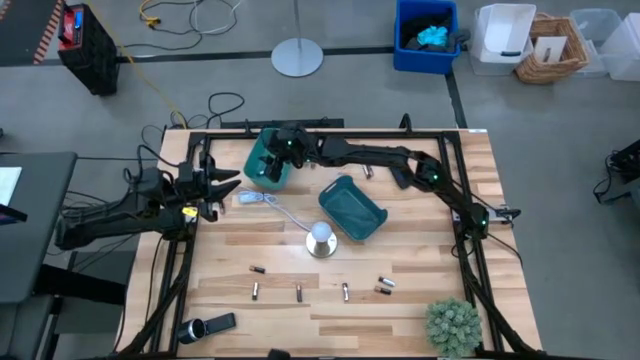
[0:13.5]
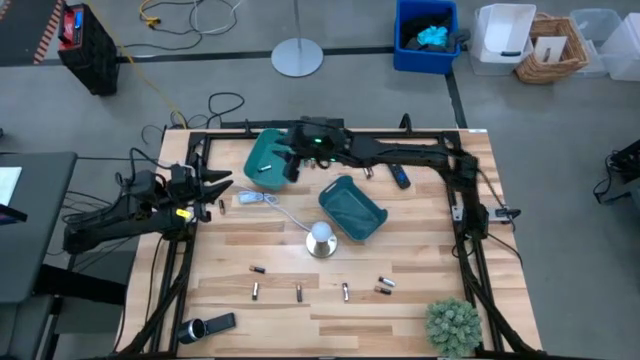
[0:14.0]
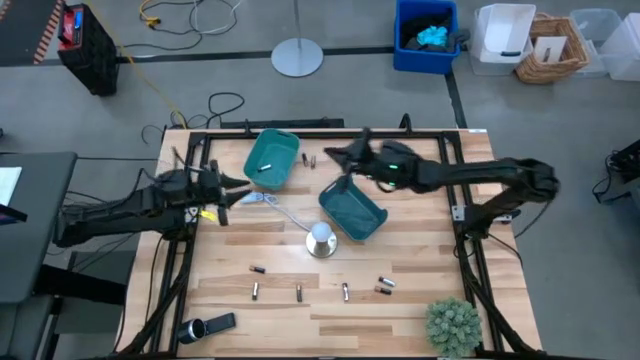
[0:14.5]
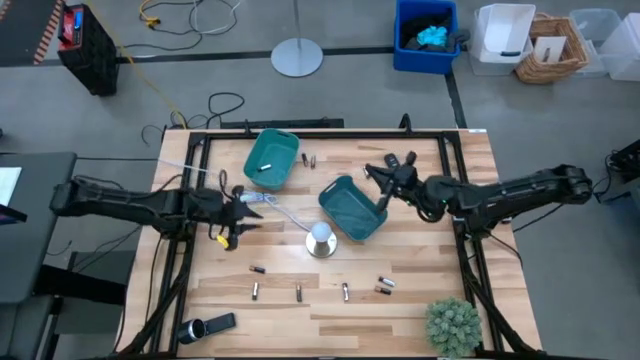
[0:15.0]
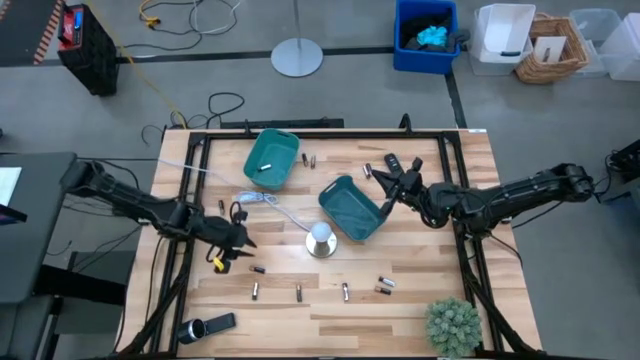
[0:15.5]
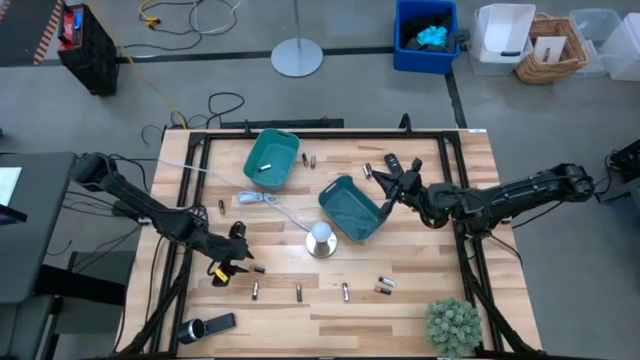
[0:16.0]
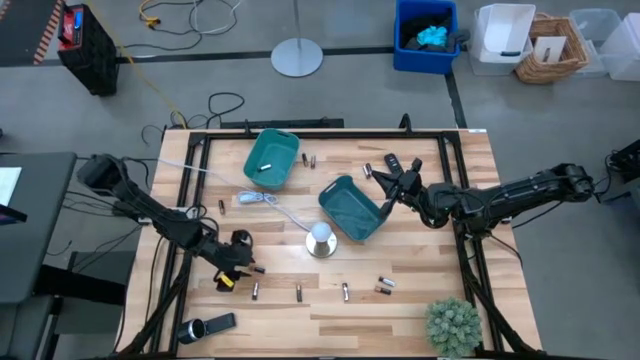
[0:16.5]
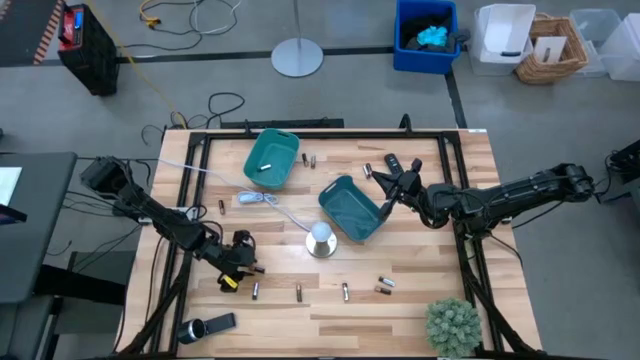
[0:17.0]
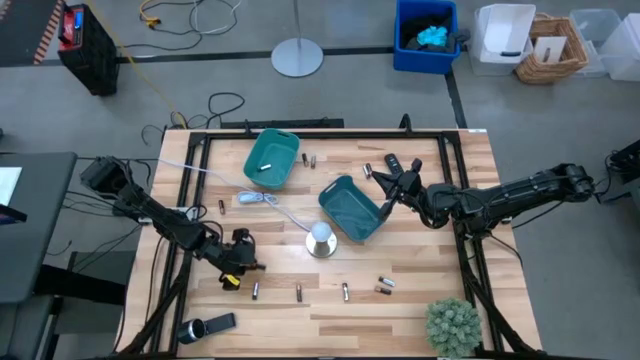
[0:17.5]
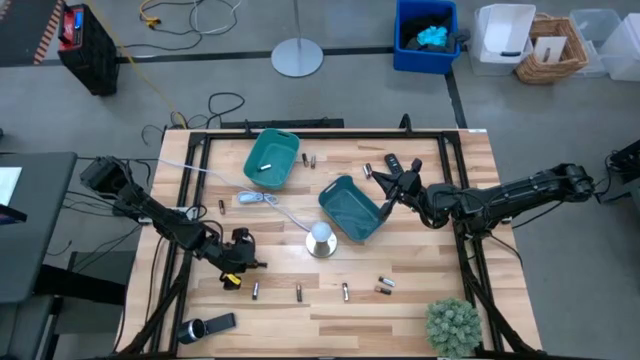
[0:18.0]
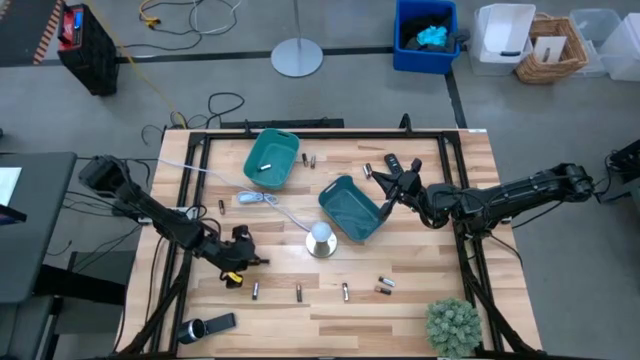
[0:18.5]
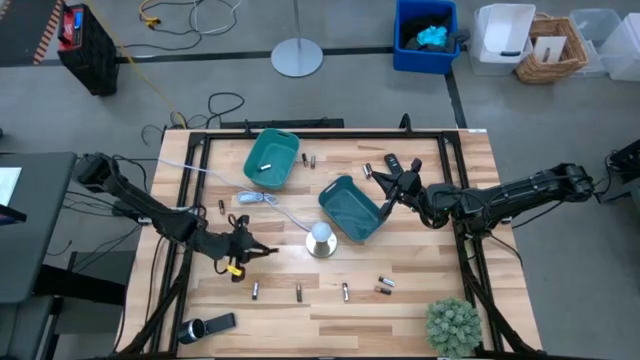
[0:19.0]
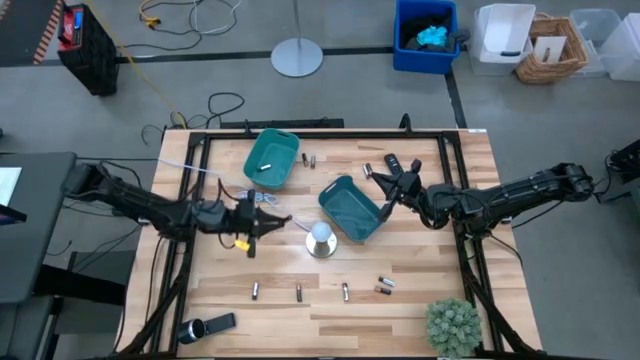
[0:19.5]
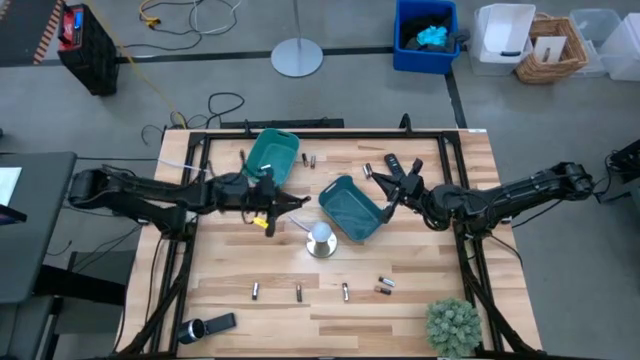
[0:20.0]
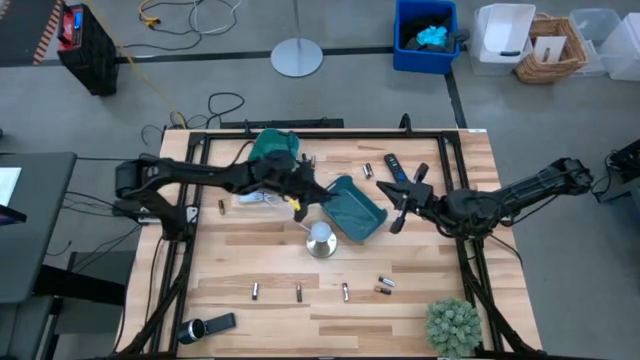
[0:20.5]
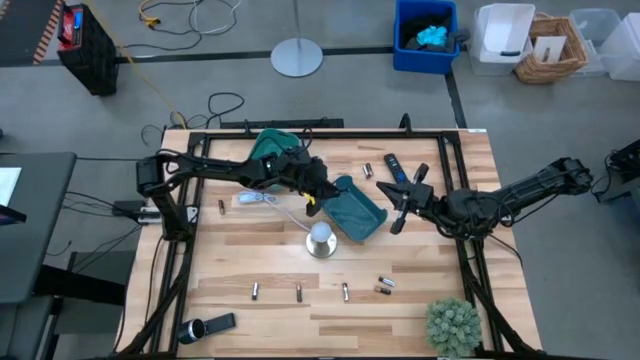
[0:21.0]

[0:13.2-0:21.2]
Task: Sort batteries
Put the black battery into the blue bin

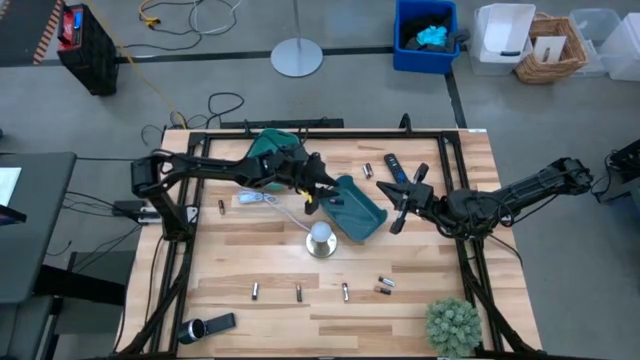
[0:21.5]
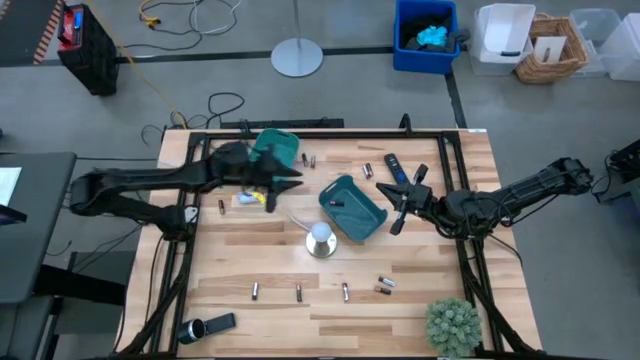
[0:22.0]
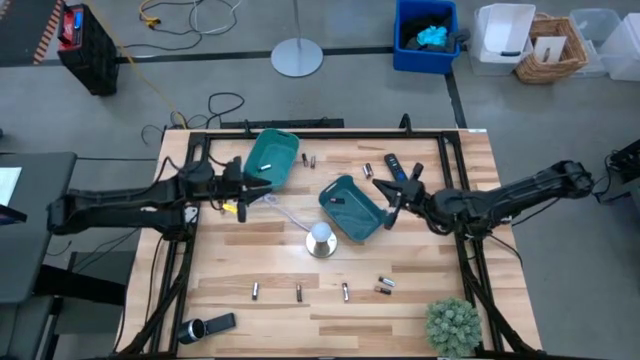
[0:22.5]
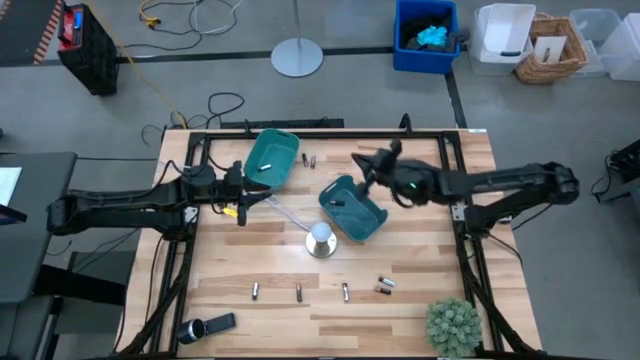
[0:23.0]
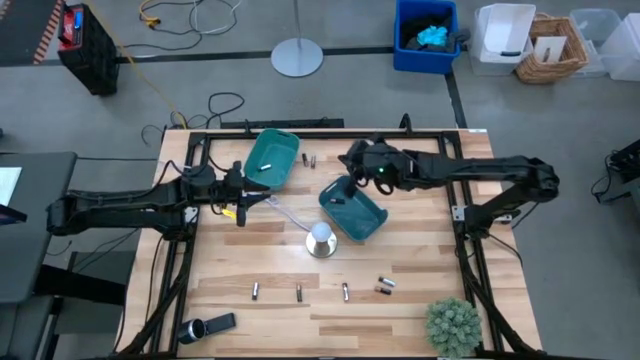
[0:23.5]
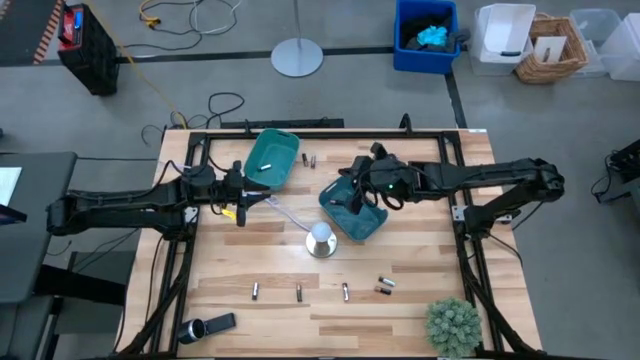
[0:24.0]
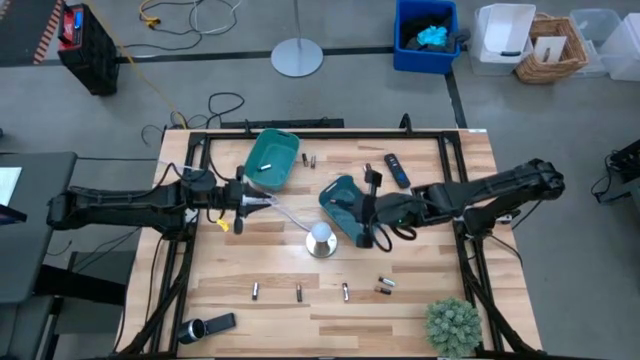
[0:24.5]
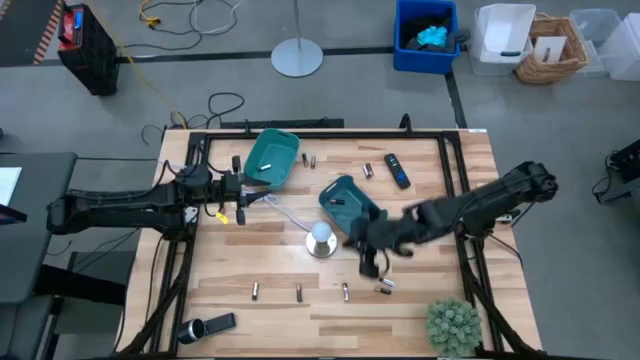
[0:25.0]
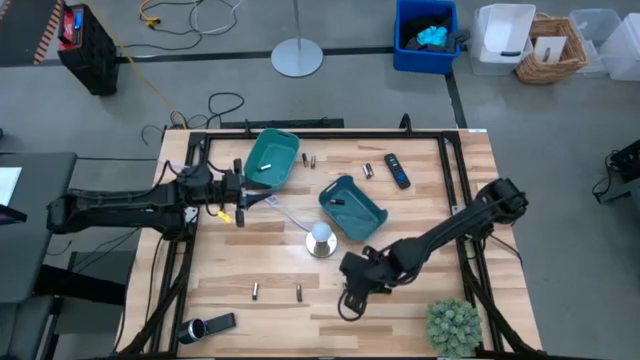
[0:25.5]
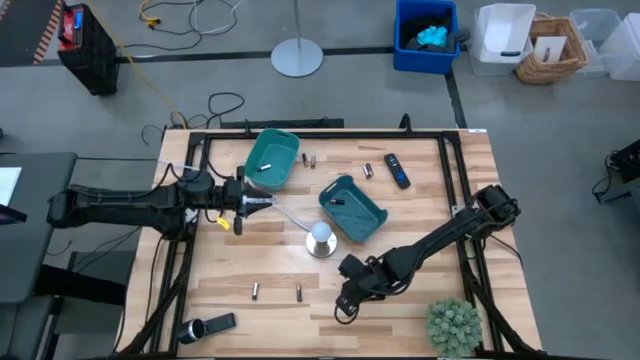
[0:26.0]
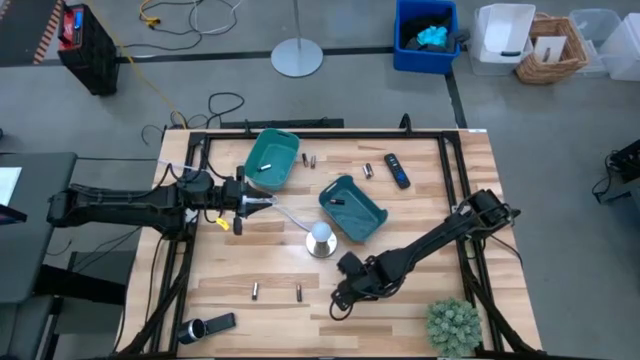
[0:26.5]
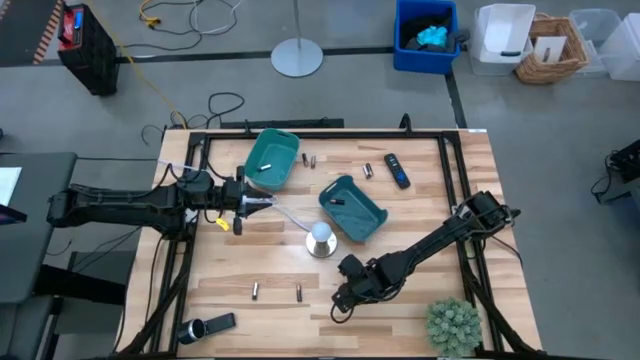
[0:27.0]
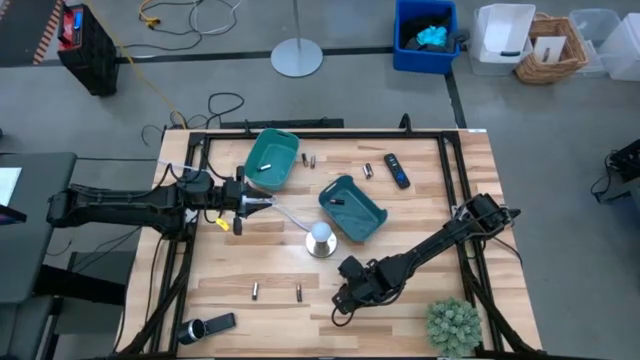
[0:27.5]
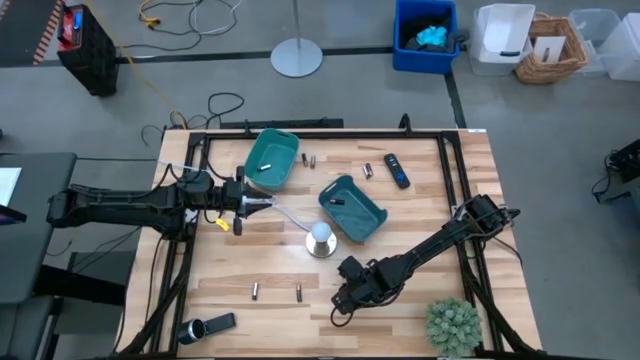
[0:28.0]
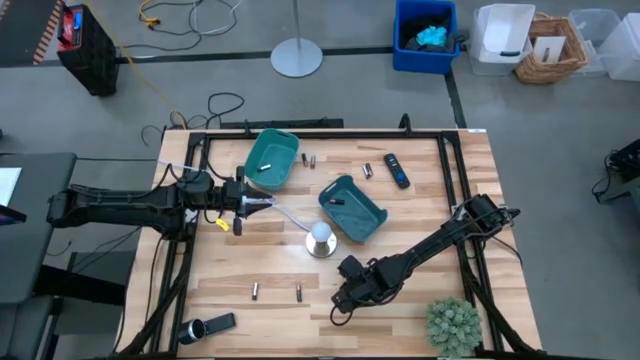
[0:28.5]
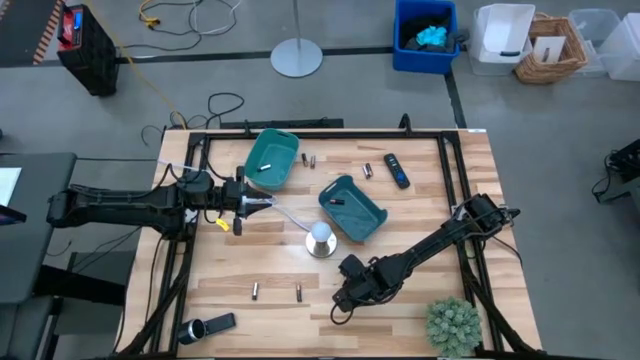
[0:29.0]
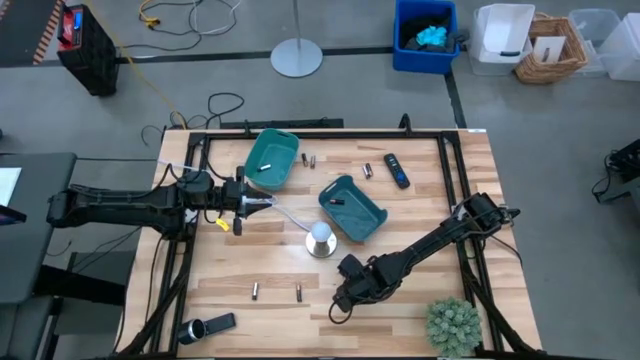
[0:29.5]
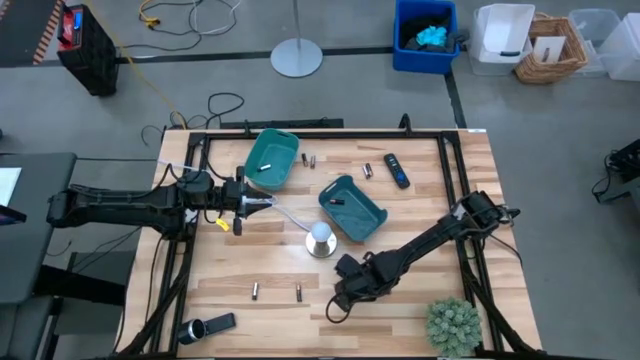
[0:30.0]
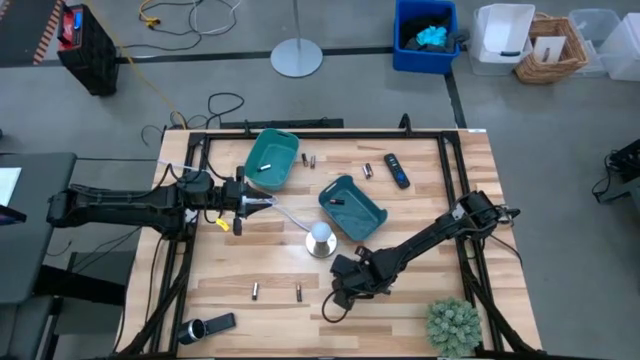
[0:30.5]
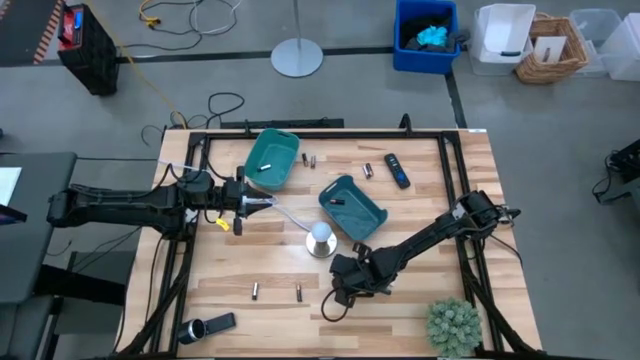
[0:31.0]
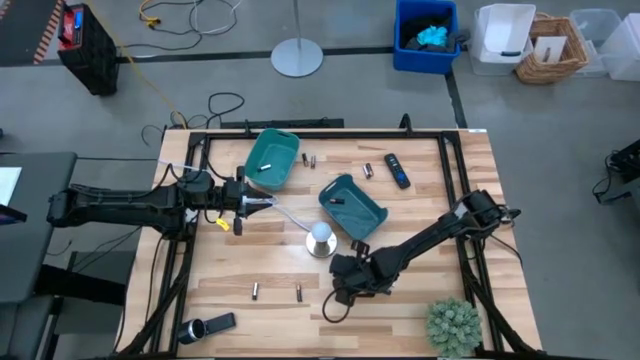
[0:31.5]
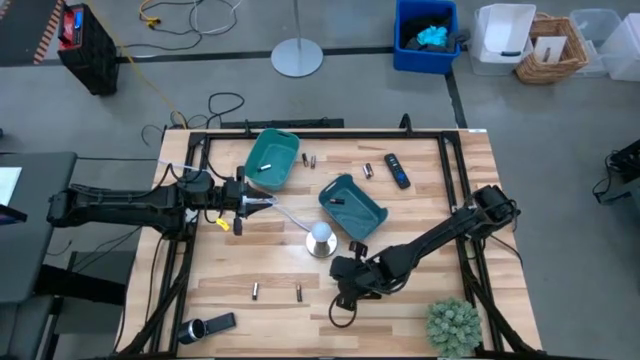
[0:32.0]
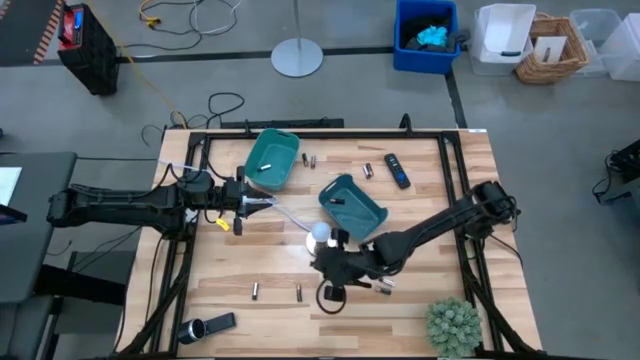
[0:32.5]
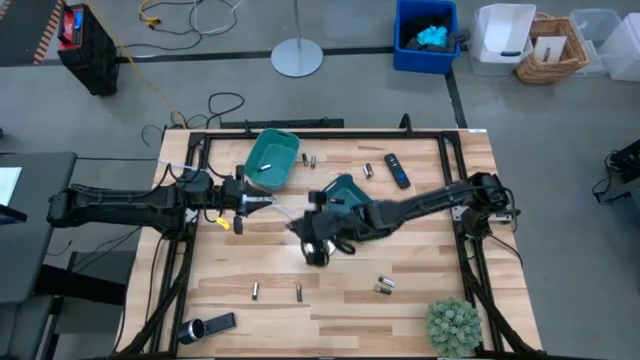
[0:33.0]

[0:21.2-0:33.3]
Put the silver battery into the green bin
